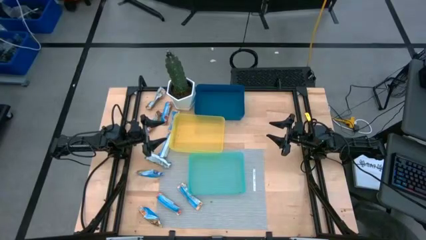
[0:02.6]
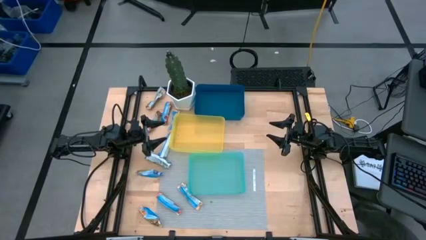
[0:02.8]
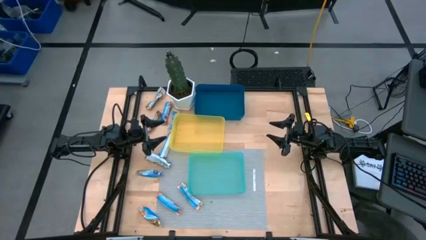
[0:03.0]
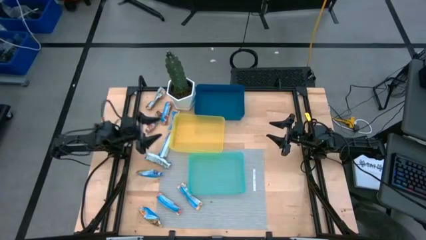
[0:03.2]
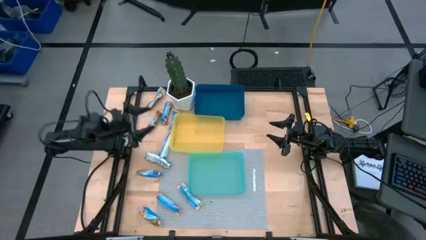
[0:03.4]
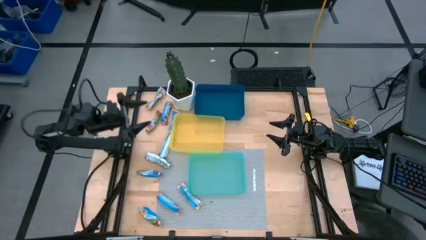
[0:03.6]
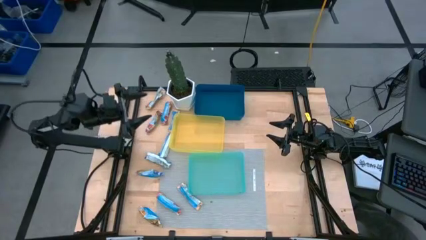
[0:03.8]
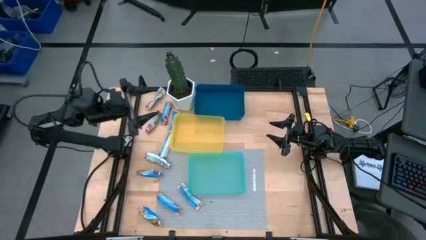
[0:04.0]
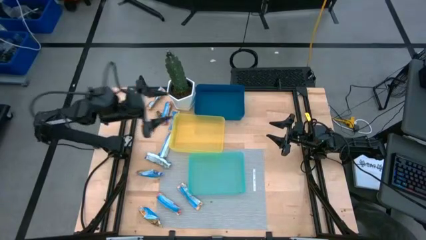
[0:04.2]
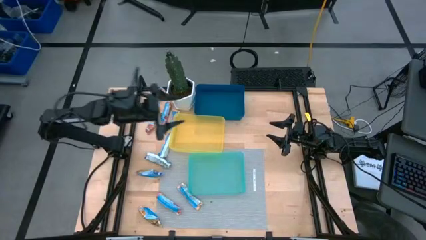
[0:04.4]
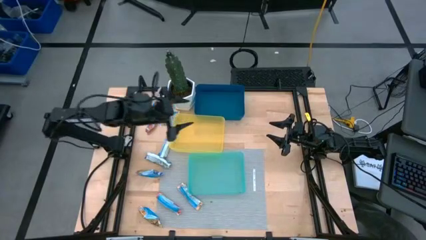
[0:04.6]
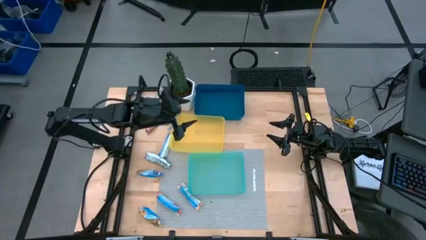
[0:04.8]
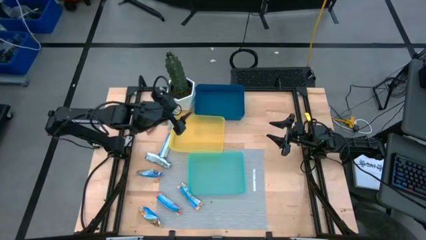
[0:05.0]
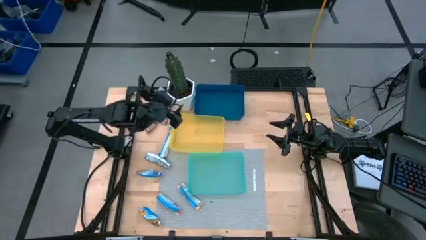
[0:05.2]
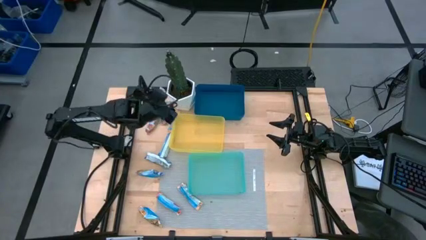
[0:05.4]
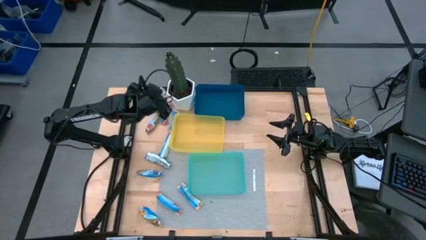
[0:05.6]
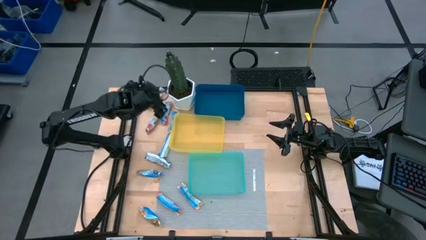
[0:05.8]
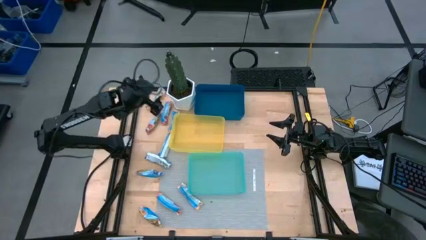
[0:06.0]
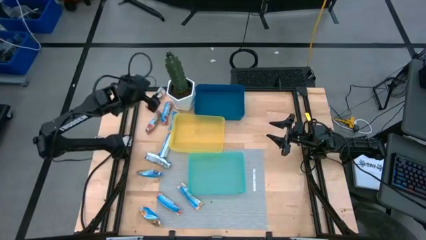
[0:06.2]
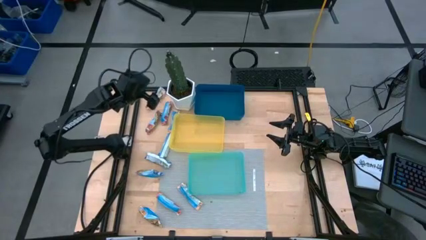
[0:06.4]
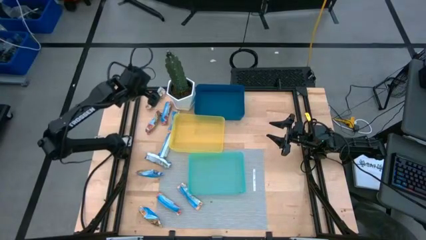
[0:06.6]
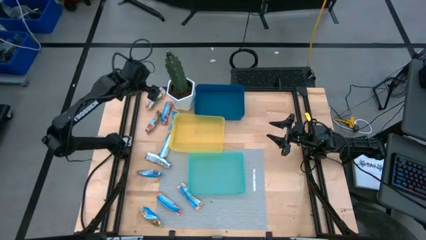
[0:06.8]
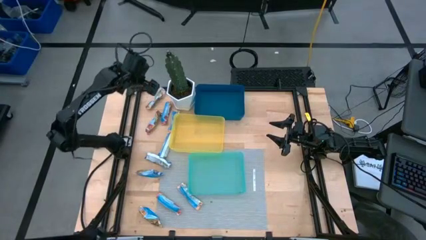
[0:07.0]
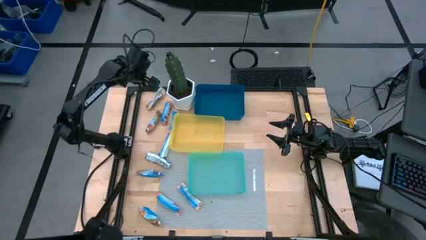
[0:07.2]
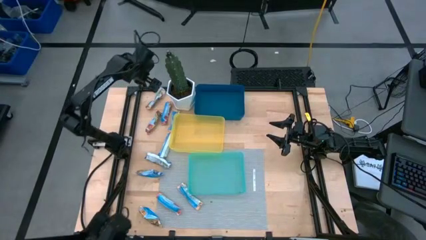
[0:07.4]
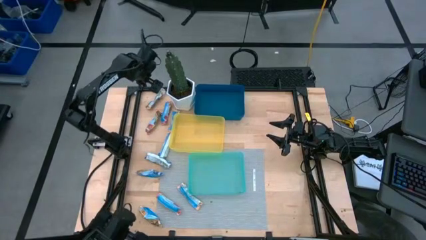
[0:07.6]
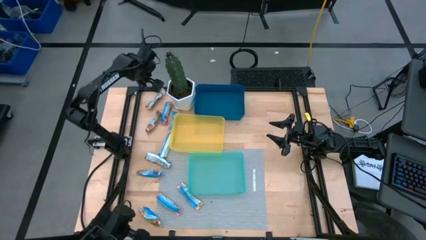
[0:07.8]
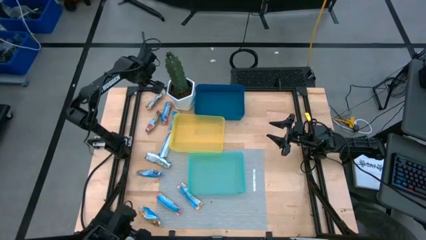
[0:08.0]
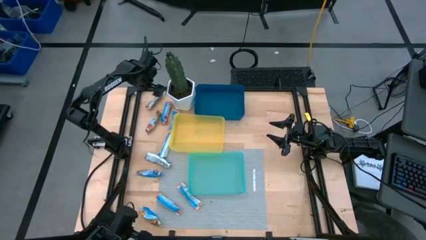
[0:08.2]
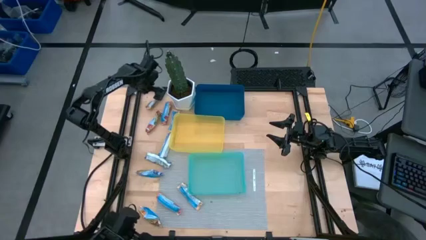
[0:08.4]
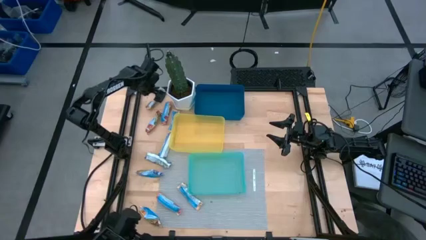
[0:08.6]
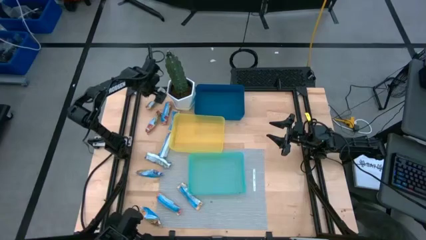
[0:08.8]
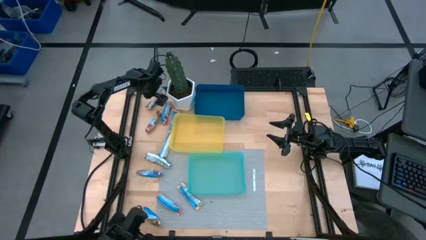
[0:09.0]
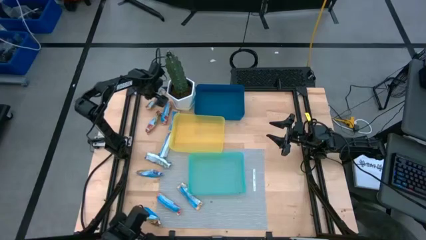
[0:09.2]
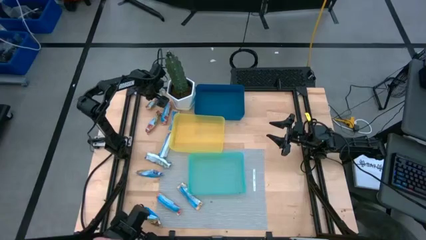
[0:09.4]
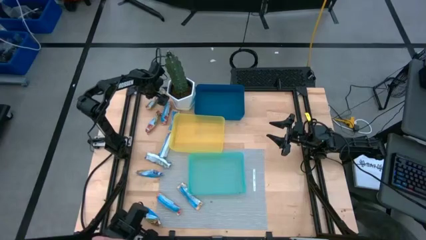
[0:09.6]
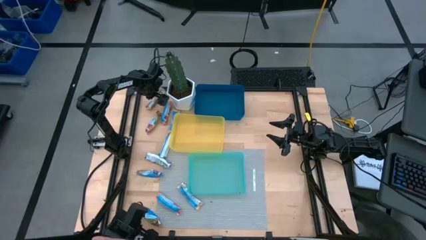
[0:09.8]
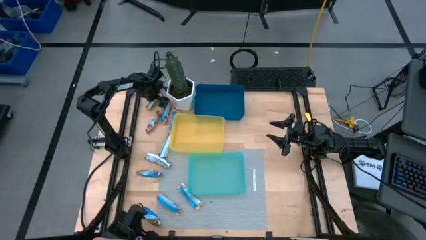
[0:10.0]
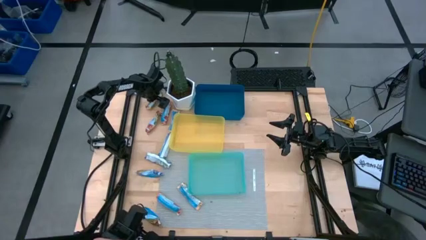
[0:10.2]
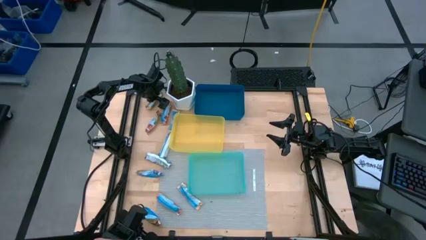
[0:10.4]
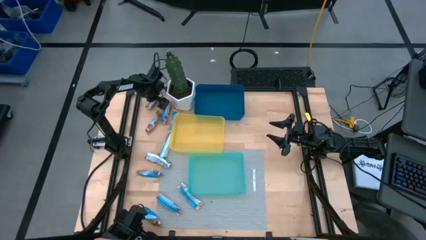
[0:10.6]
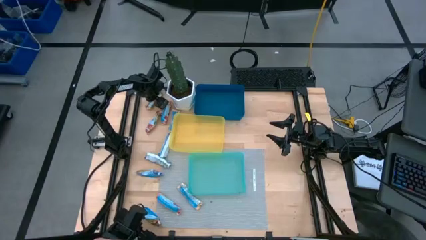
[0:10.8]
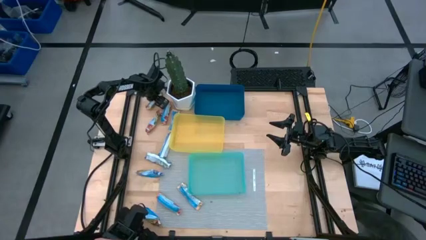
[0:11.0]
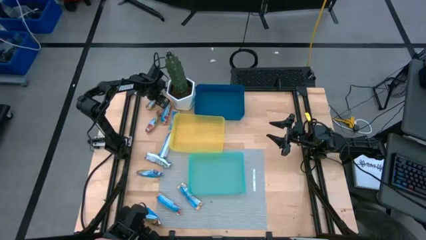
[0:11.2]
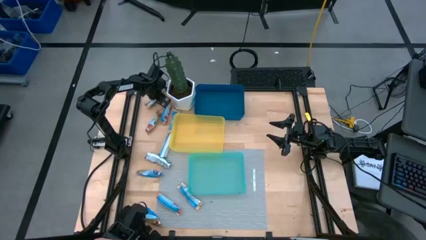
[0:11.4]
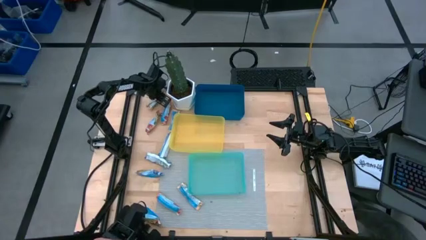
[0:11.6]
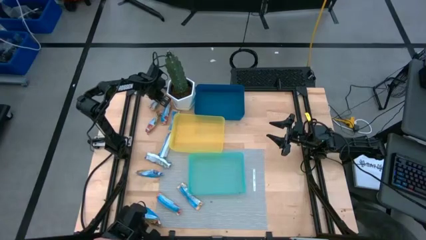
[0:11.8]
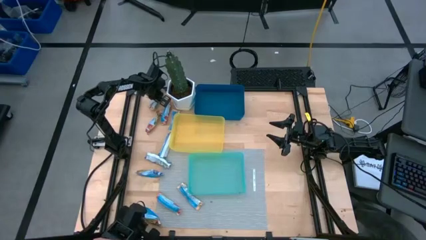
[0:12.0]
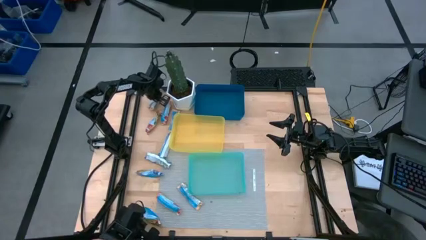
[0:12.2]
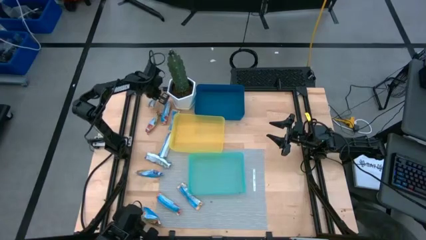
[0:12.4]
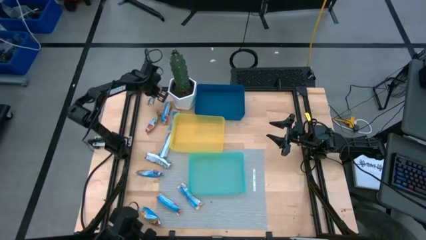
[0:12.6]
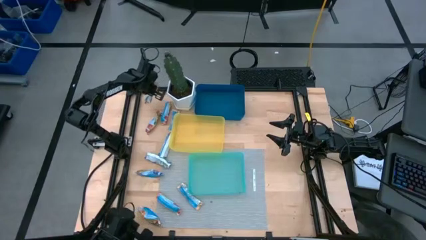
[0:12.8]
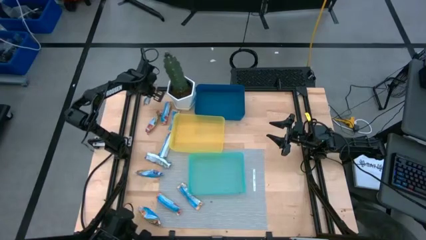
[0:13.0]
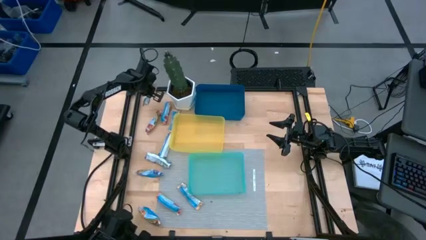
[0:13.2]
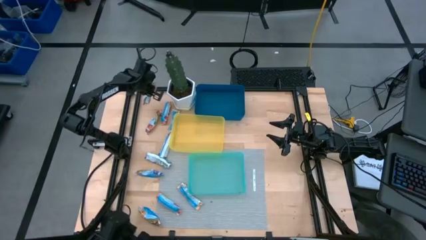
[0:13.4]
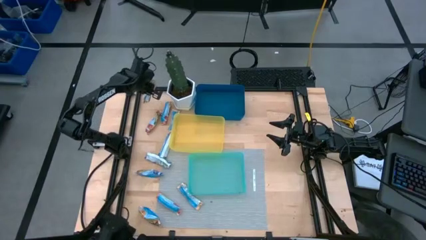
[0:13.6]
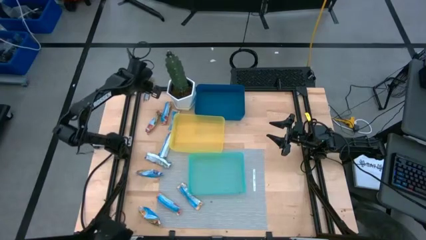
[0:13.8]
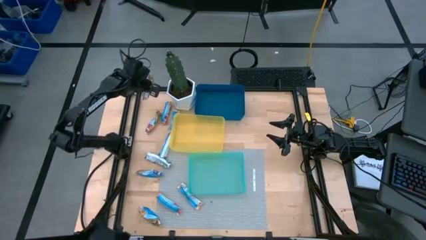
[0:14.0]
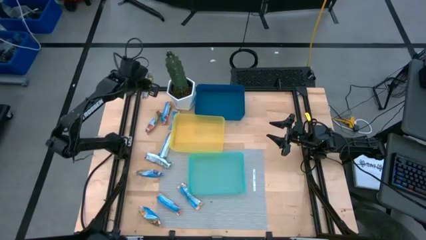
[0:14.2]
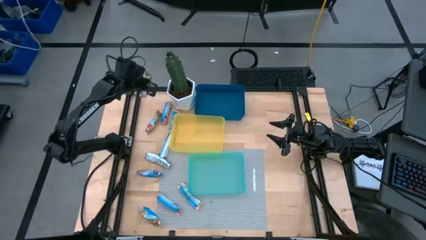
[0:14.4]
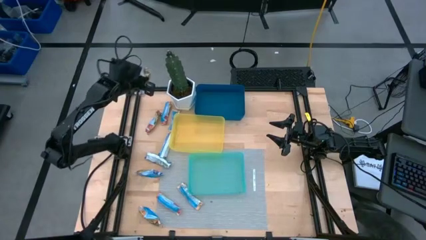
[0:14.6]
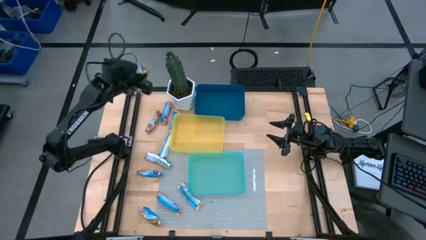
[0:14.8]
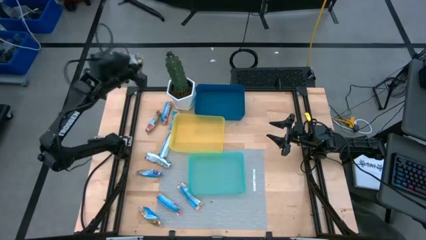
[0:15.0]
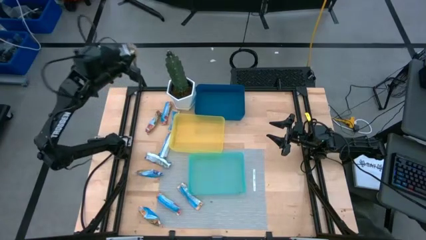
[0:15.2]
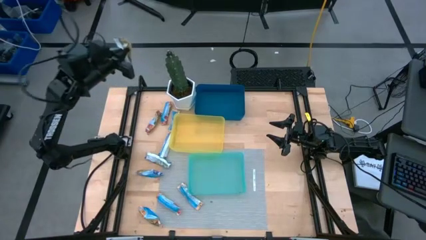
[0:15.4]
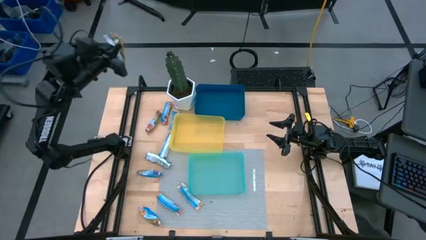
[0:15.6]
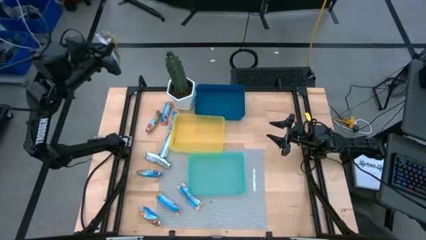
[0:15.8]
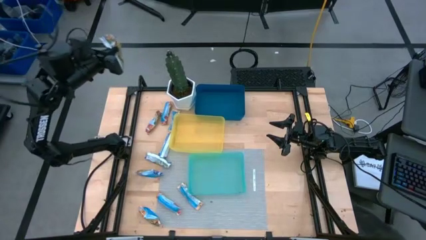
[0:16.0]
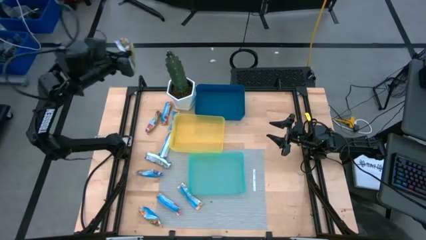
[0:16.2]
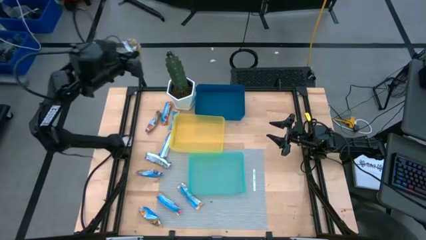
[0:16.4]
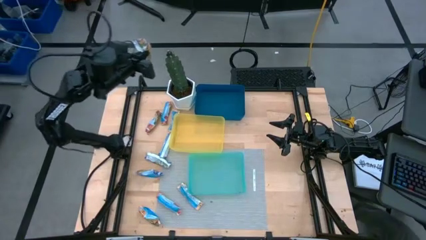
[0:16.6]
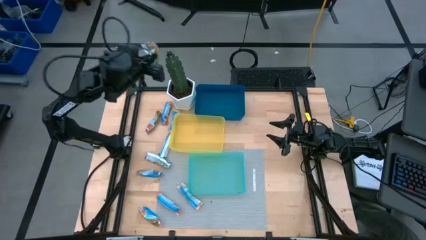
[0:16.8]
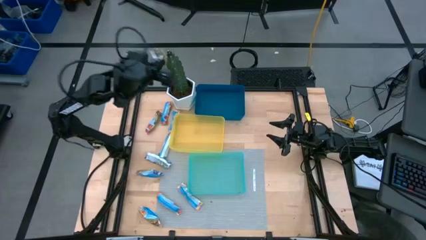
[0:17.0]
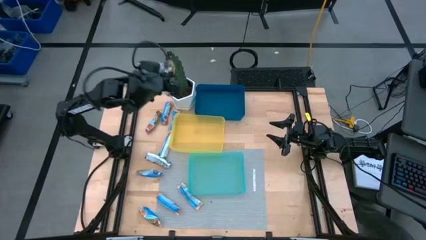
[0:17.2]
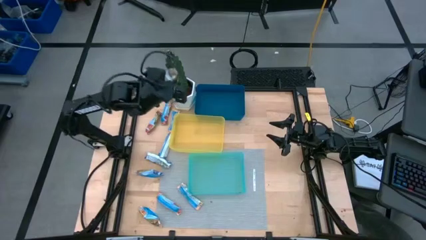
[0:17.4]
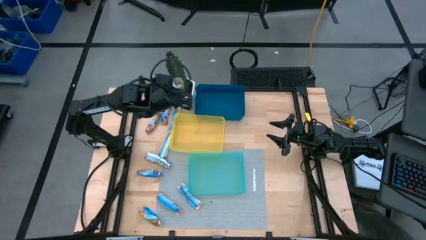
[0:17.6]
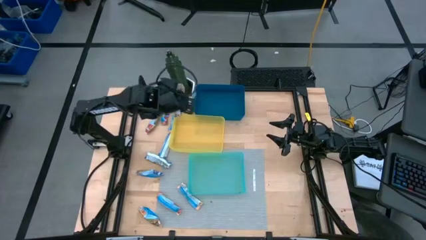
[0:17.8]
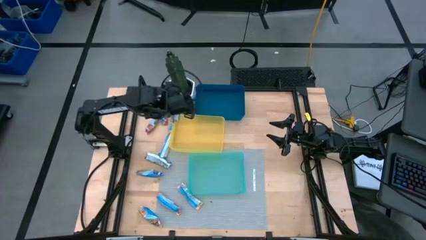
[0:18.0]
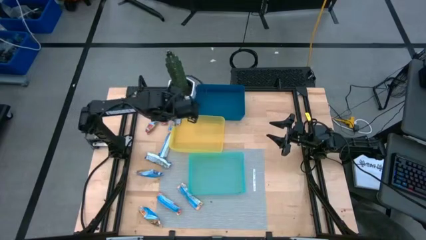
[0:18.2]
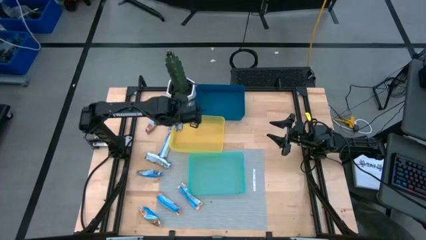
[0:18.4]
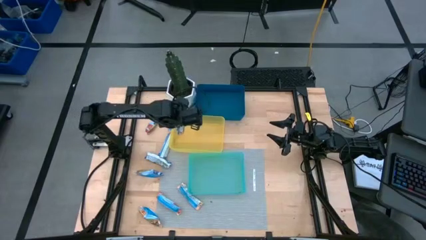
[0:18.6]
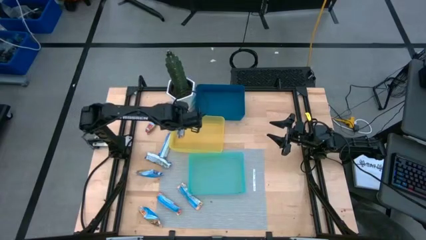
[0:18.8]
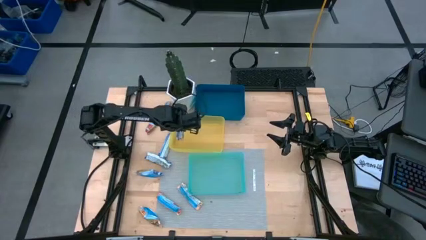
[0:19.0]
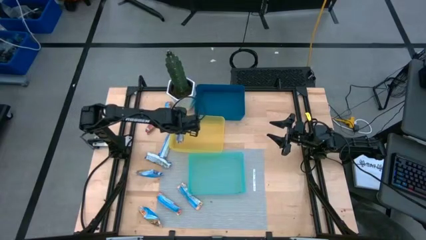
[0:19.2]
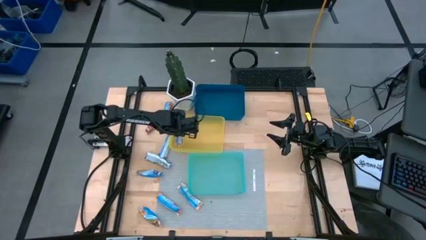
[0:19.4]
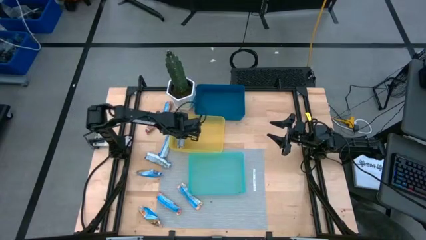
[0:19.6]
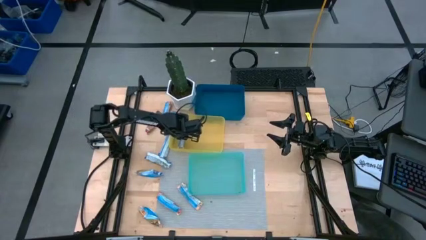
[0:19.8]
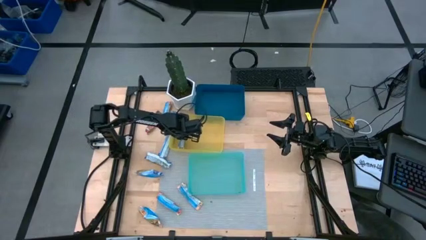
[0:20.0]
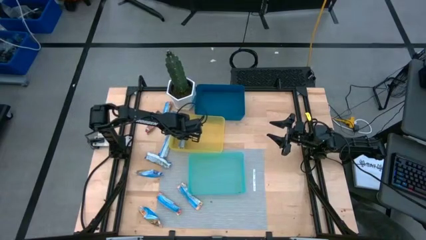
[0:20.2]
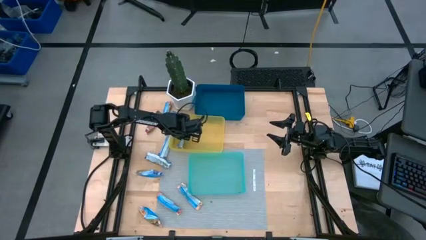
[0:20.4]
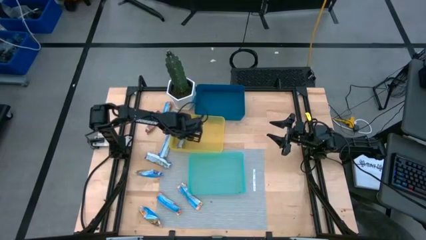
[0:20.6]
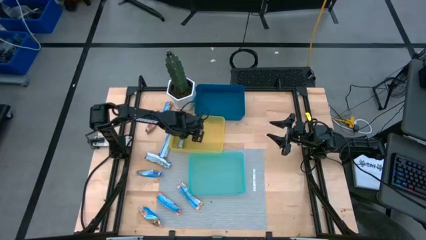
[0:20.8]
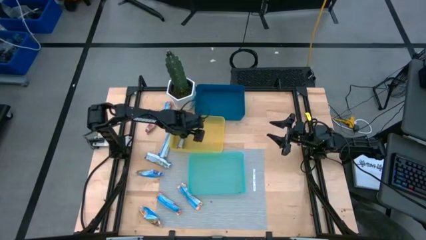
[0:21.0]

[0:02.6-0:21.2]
Task: Pick and place Granola Bars by type
Put the yellow granola bar into the yellow bin
